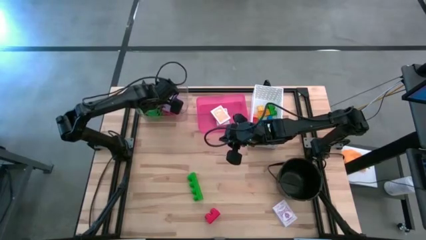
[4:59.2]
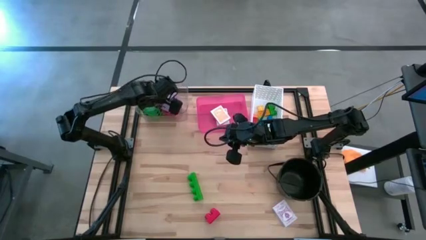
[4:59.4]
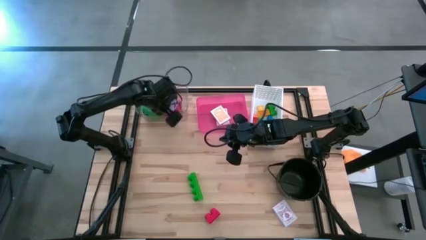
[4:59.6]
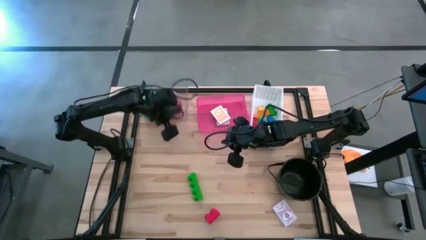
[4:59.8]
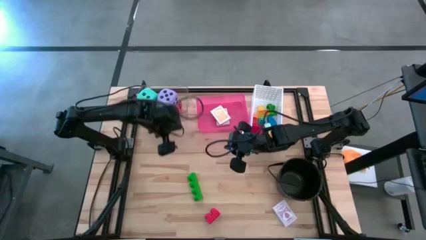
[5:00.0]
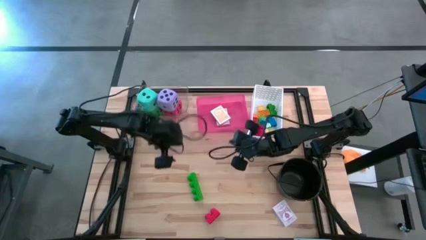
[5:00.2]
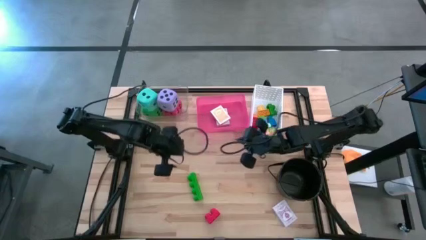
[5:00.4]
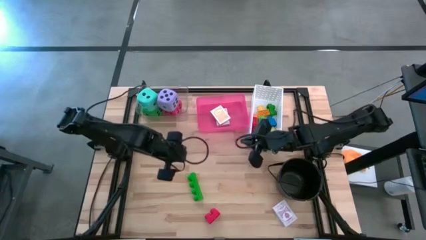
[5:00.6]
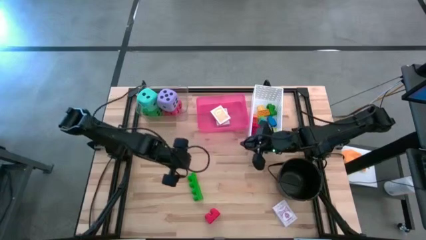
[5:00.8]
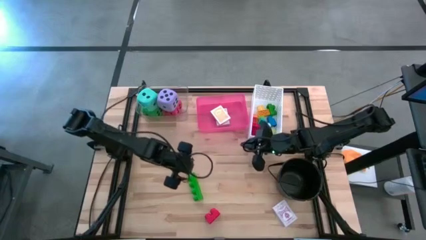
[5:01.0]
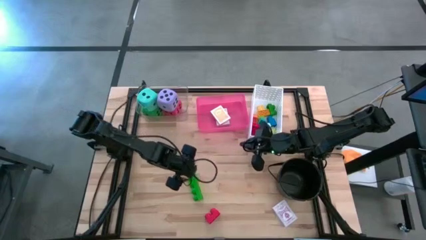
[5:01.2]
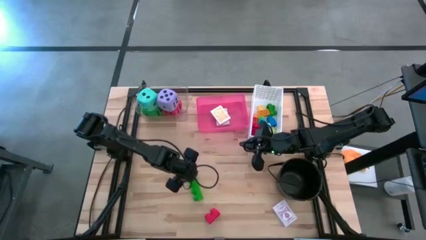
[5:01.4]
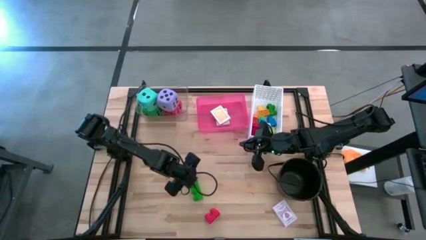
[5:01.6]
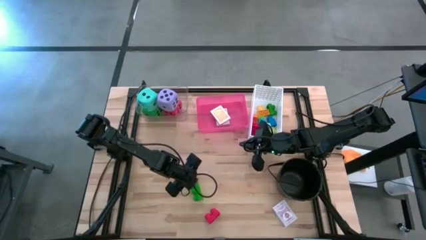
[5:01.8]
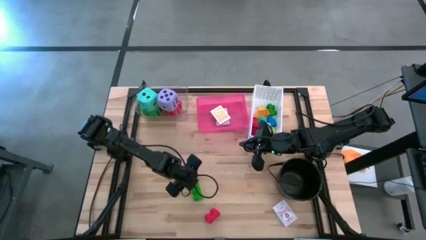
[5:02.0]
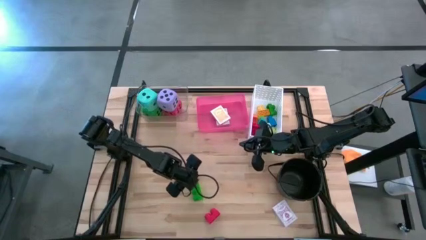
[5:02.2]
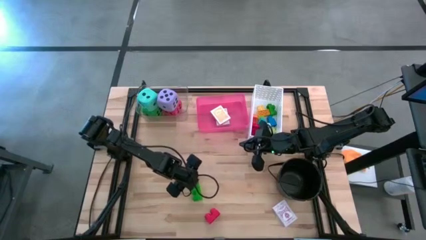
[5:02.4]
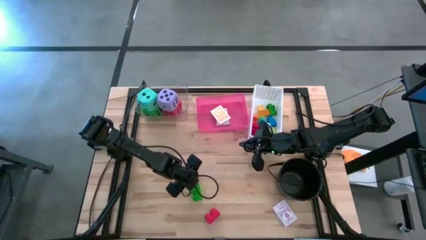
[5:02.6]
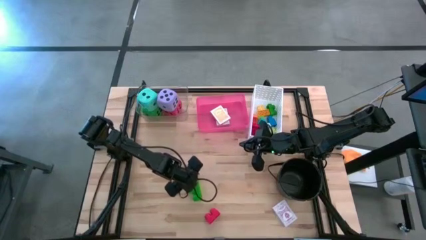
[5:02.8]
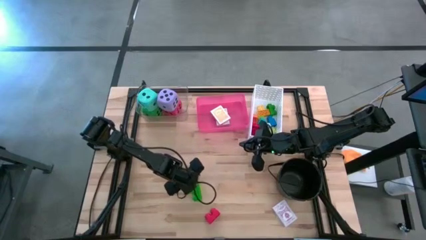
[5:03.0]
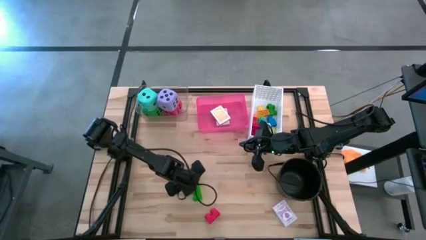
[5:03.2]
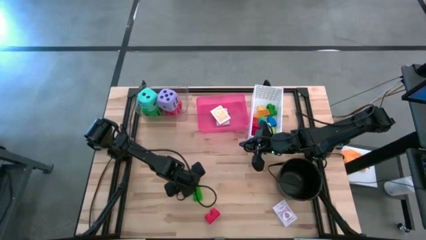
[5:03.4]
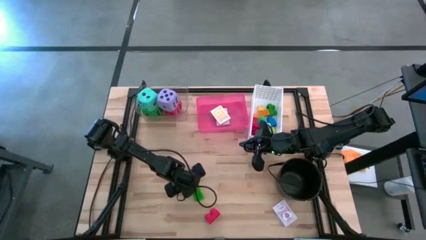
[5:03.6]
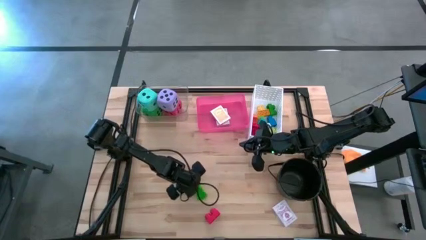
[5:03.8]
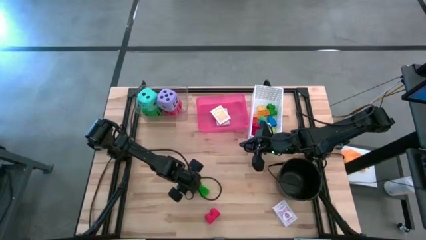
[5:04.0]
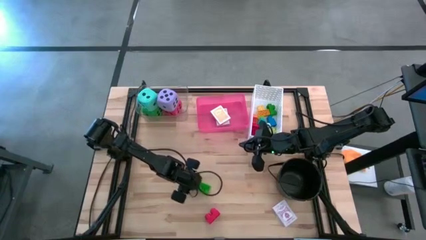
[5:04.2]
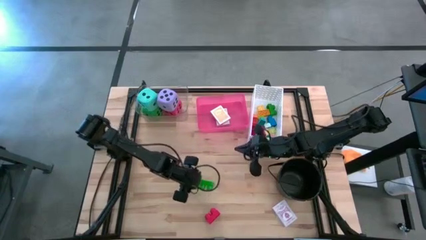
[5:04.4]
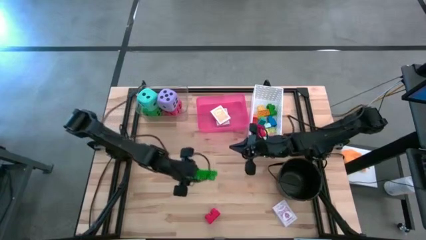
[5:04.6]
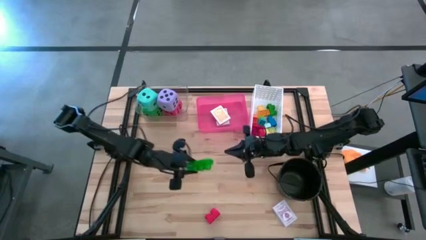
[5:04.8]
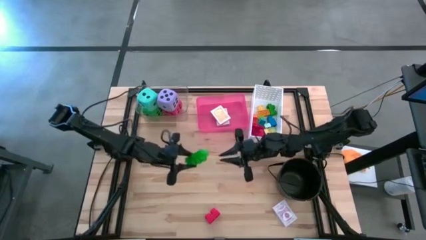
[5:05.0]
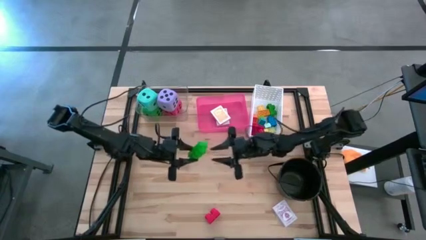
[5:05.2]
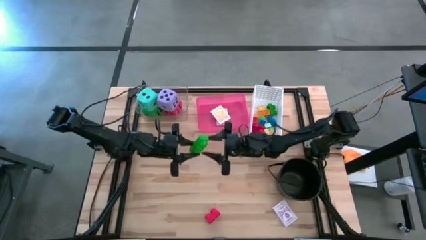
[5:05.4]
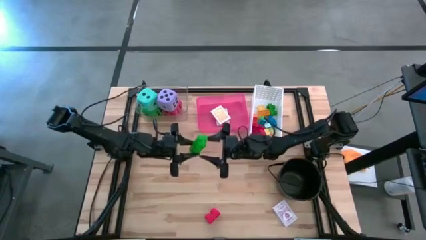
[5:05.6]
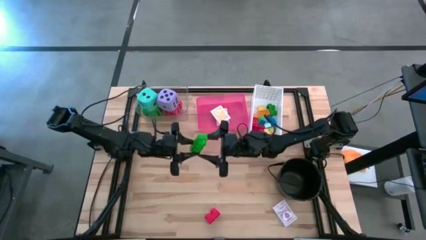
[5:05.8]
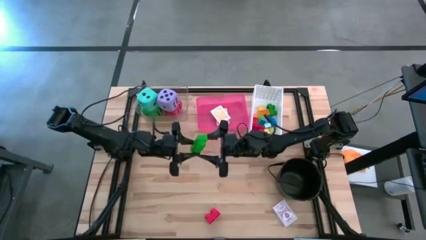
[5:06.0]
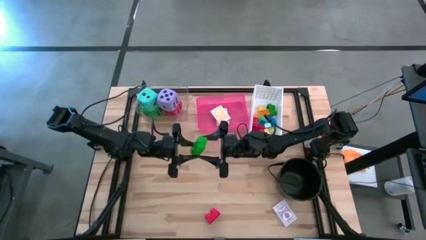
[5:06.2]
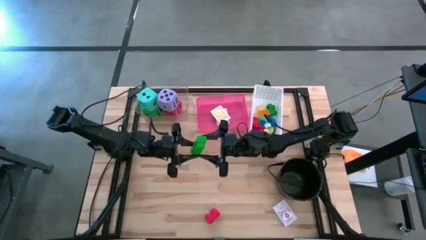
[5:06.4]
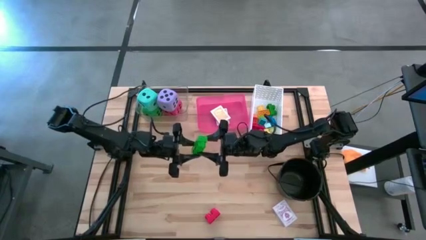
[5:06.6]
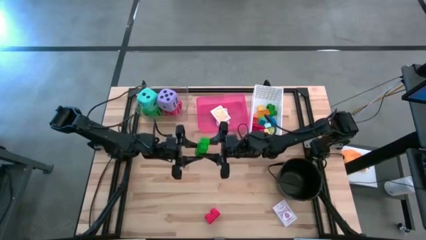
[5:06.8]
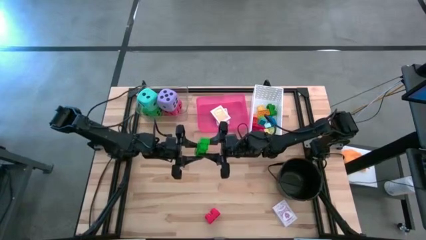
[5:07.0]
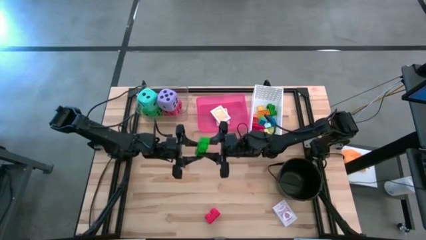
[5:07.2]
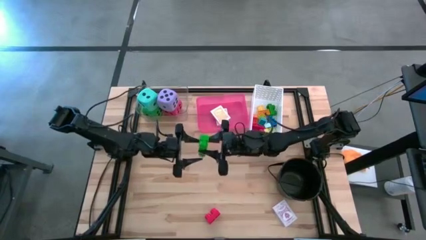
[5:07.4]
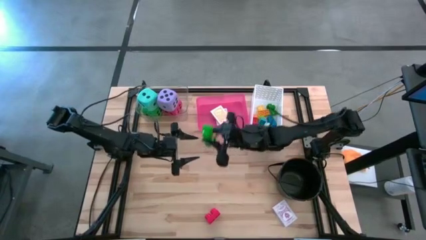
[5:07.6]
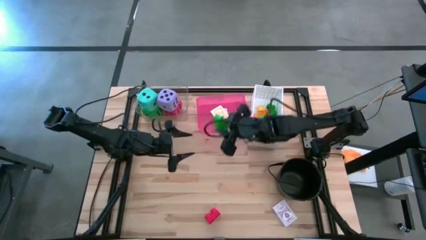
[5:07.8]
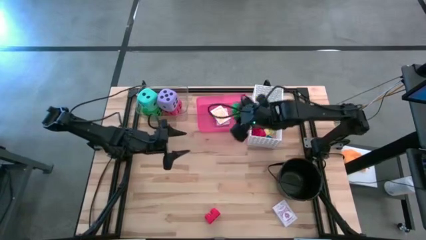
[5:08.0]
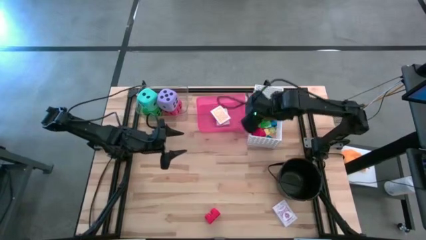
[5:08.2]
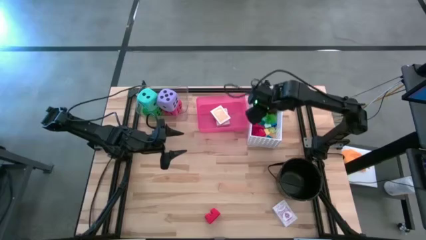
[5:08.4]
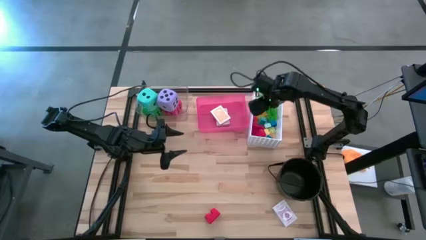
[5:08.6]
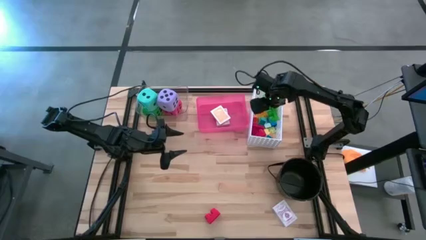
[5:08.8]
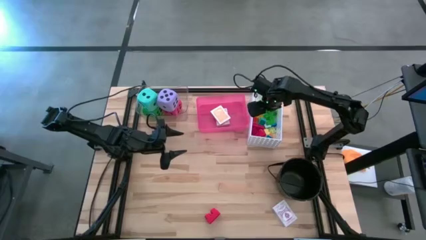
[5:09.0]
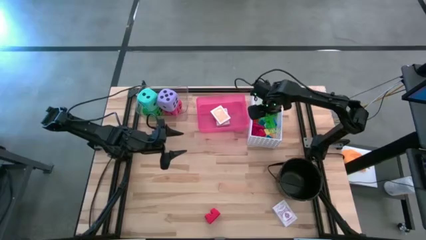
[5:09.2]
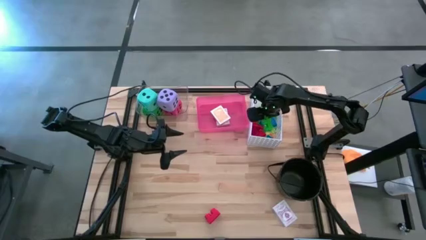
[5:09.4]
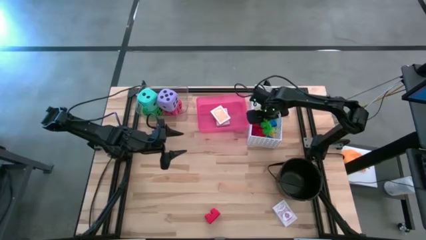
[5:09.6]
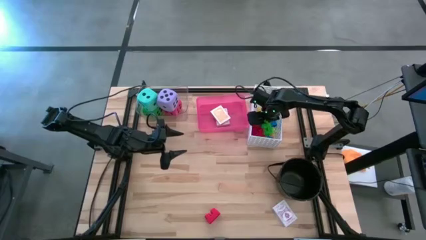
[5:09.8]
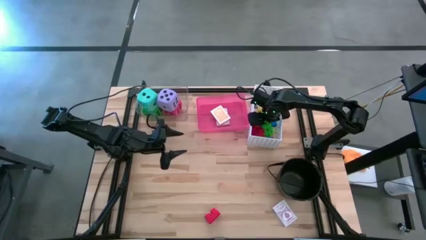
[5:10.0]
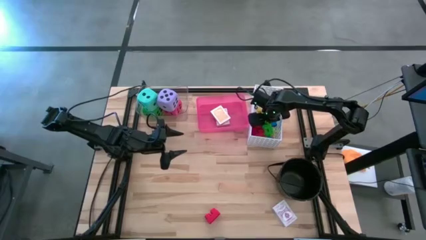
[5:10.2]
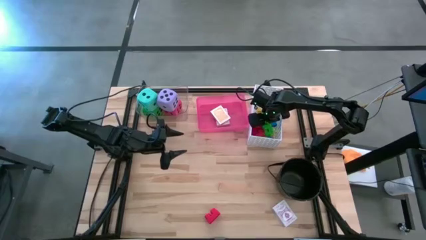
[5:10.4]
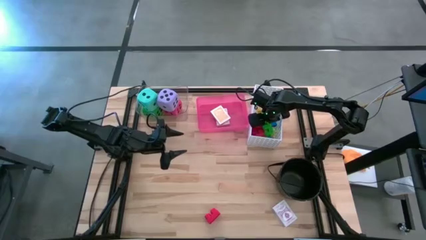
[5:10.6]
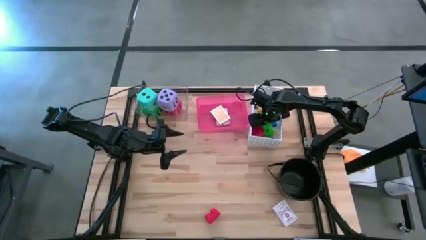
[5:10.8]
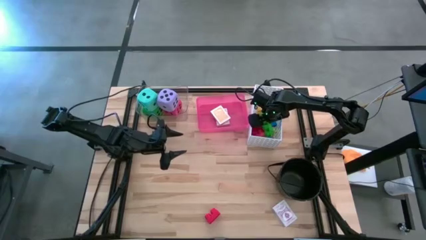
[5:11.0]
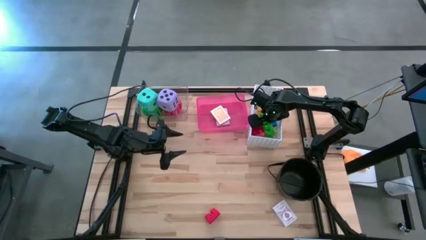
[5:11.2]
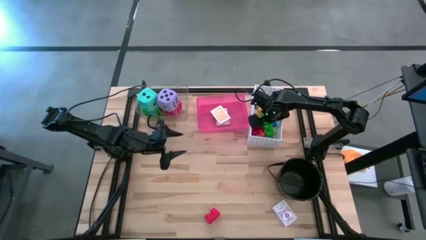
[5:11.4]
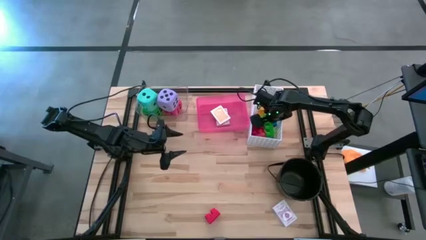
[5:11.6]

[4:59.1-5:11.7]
Task: Pick & Place Toys
Put the large green game piece into the white bin

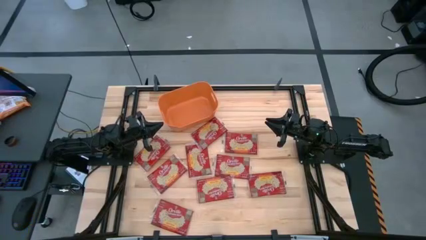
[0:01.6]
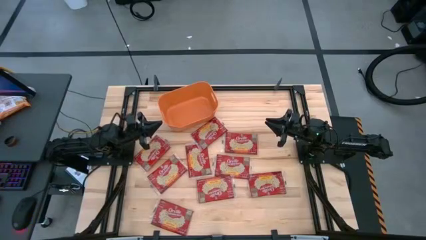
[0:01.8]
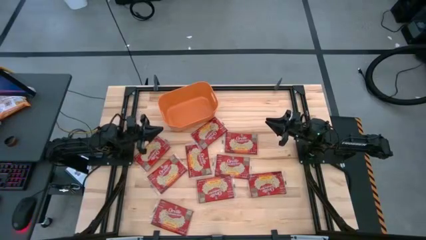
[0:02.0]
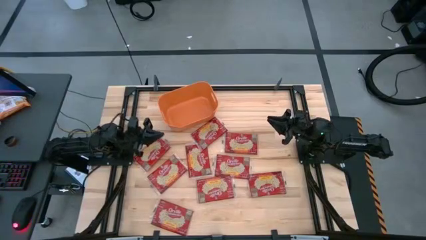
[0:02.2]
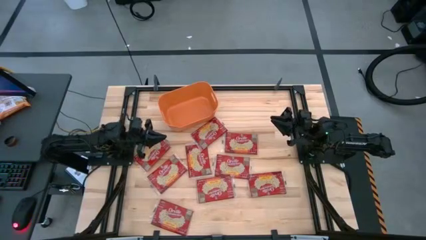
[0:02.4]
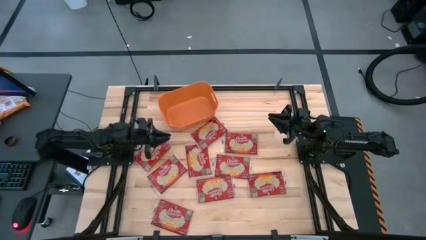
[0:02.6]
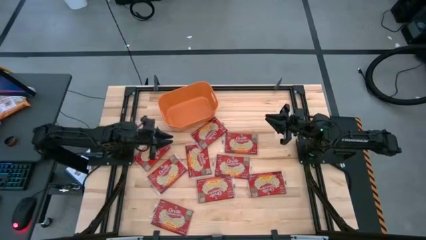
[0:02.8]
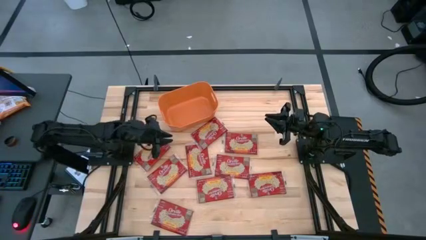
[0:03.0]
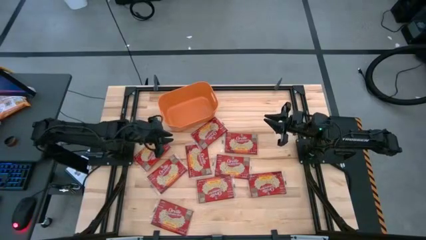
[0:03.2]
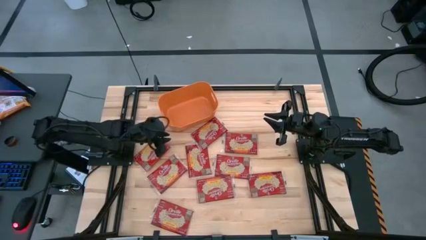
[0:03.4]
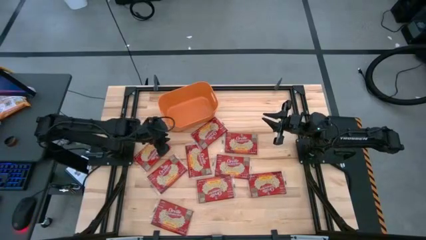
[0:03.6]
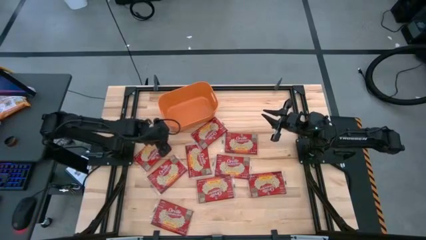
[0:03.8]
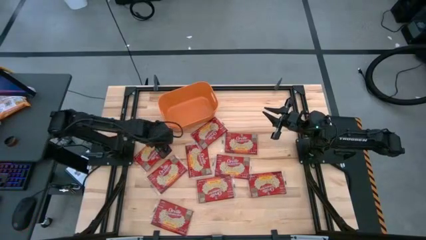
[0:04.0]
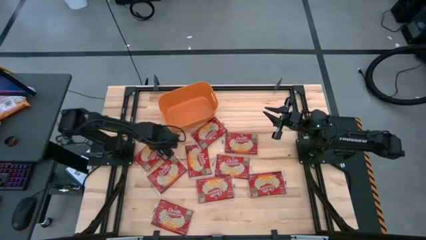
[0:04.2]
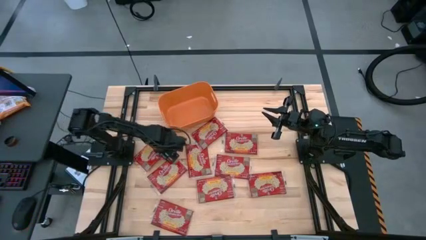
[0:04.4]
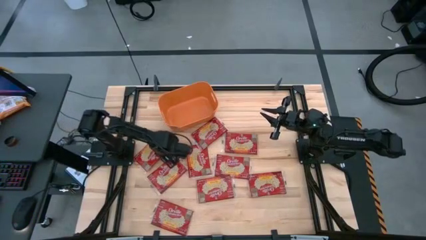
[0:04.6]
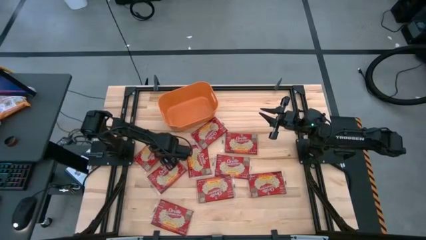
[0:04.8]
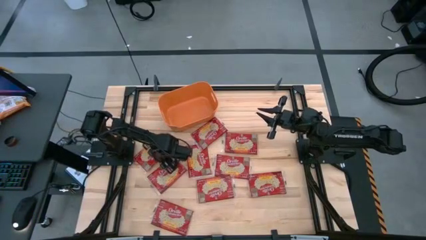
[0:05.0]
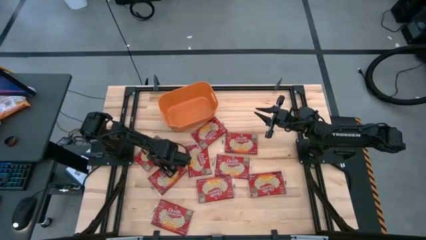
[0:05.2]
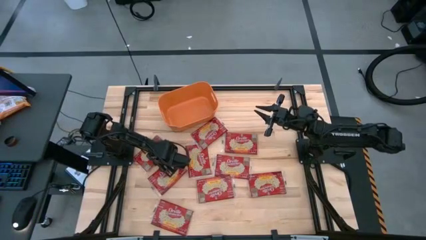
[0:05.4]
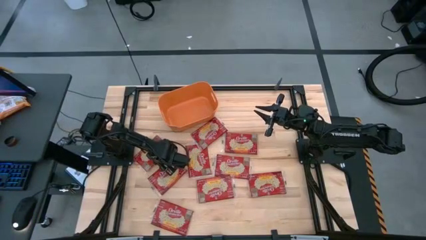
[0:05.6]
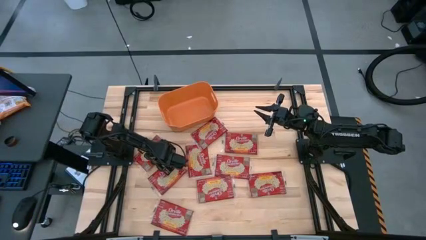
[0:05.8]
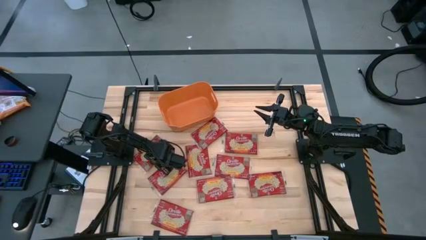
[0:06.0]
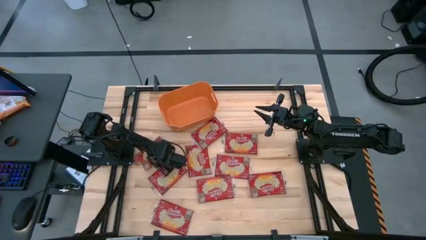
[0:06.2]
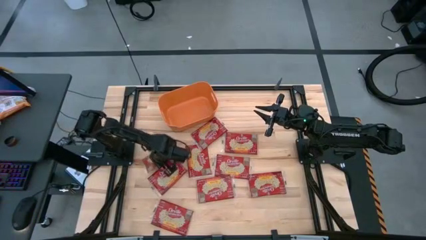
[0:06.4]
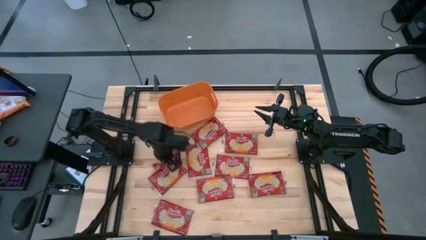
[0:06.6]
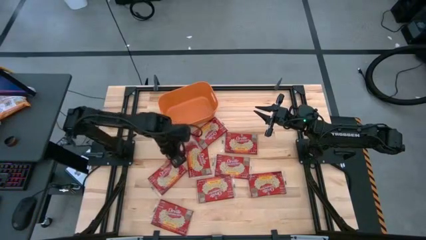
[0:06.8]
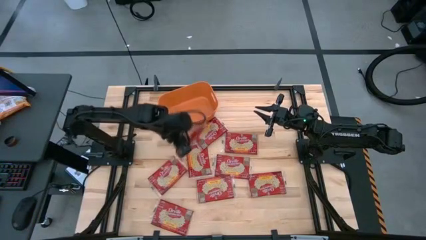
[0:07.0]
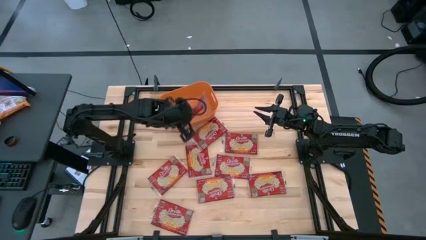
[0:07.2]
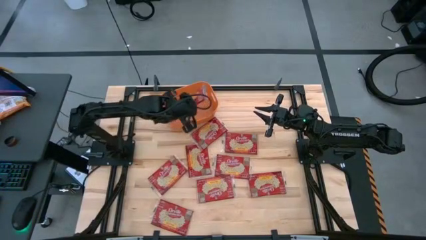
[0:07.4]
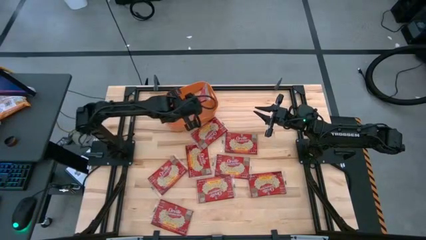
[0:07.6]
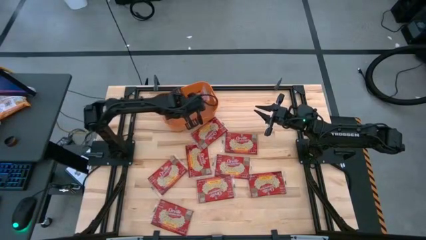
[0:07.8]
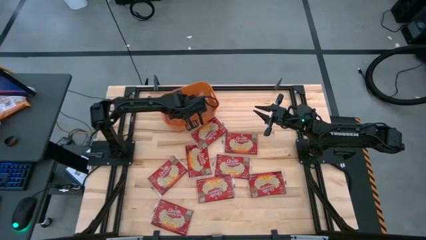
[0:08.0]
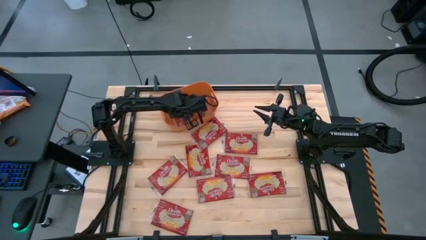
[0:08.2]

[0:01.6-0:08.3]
Task: Sort popcorn bags into baskets
Put the red popcorn pack into the orange bin
